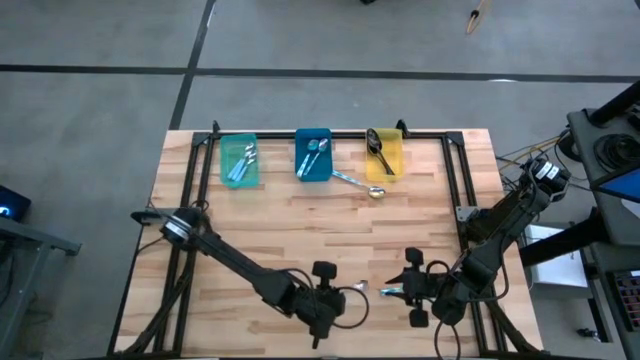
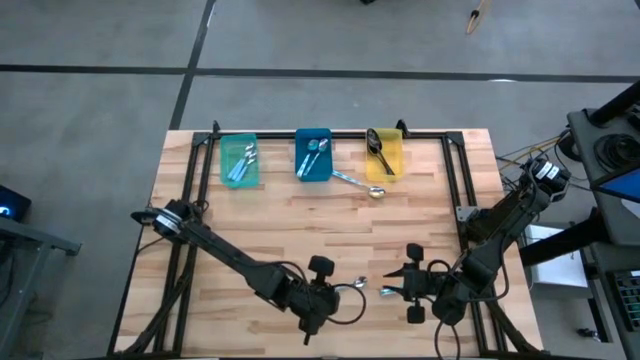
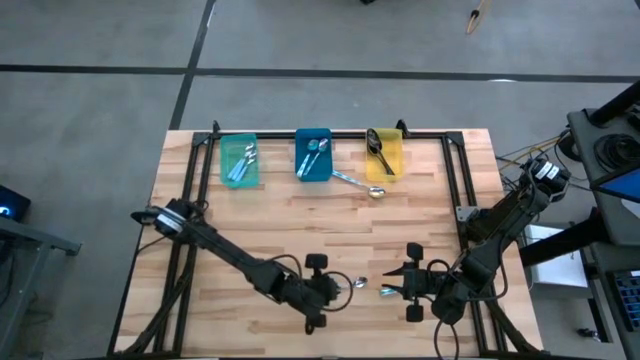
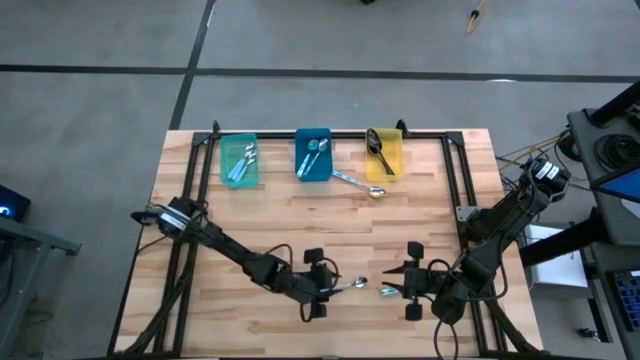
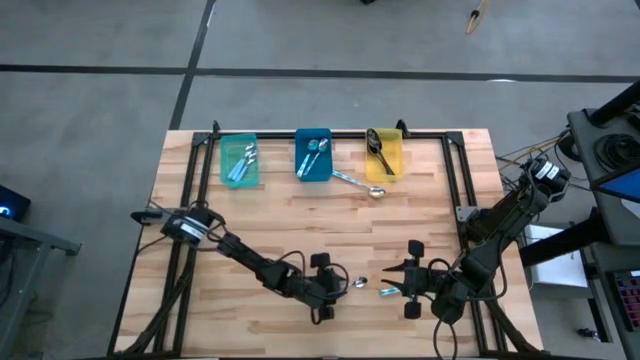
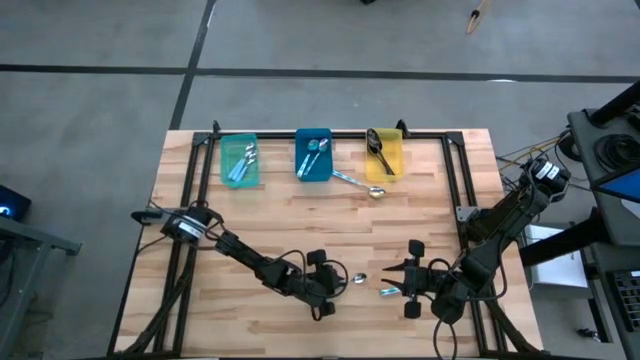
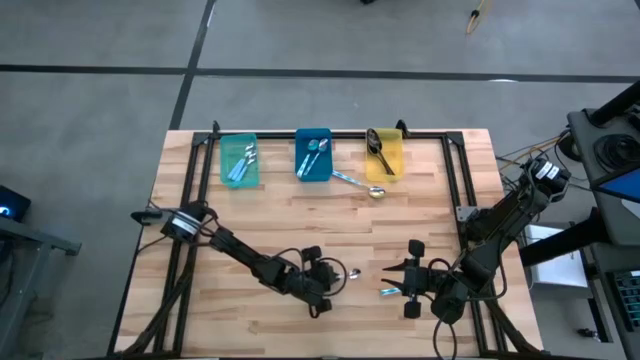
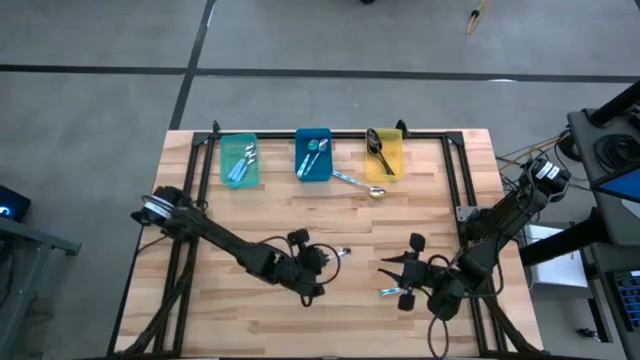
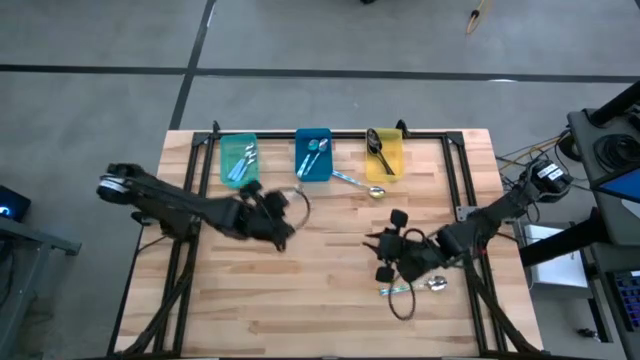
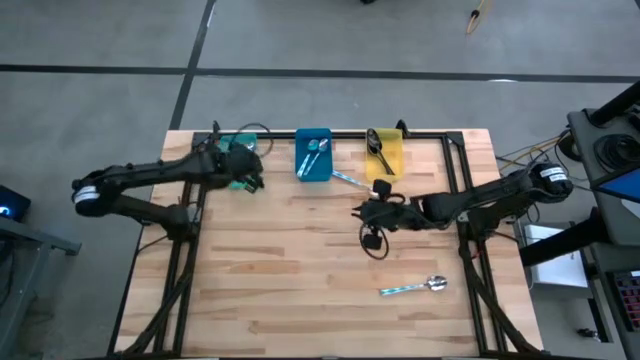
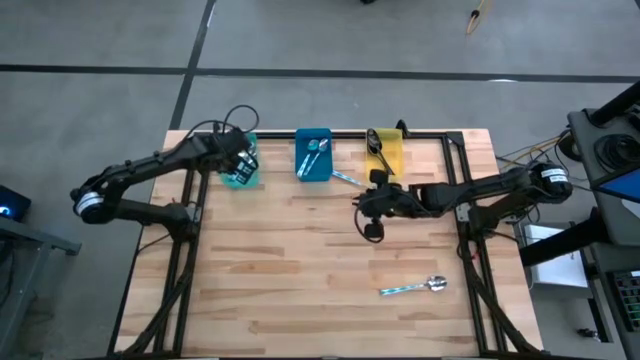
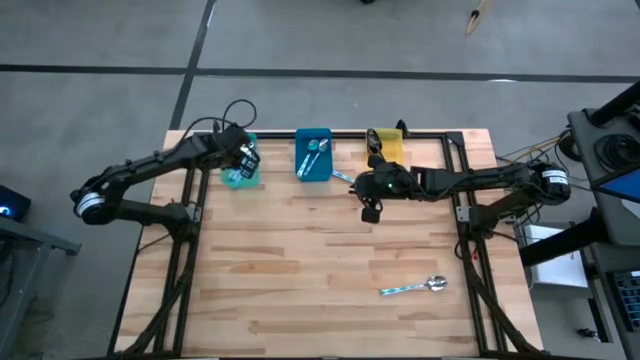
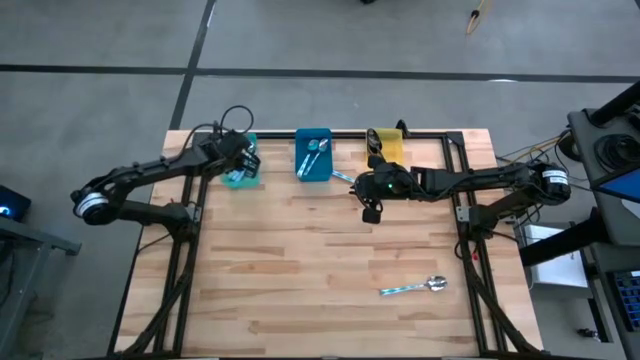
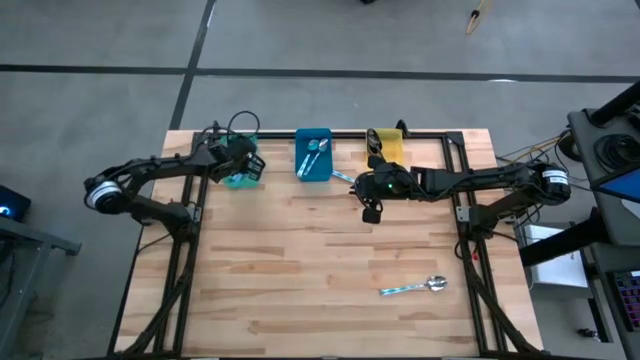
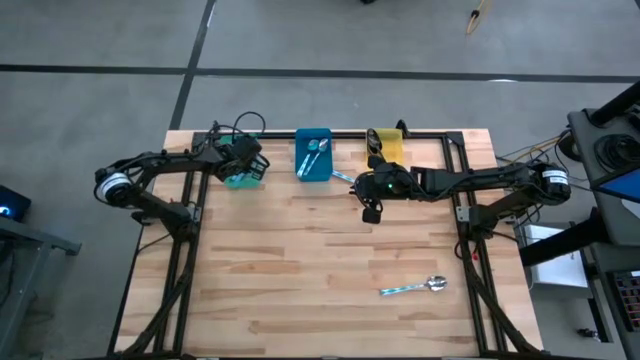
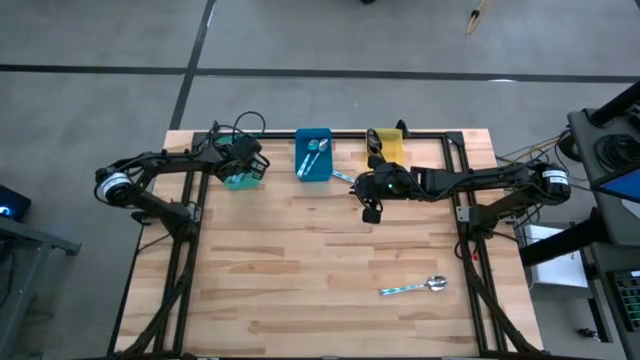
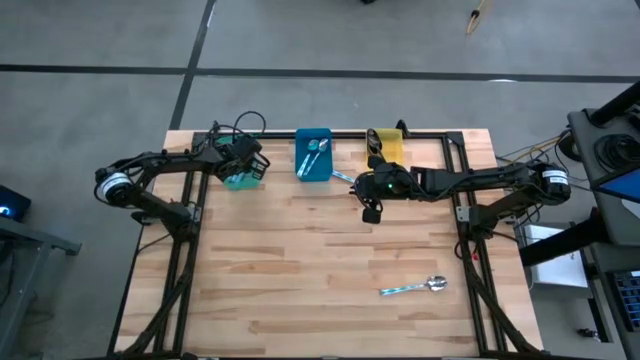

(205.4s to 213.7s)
Task: Sort silverware by color (type)
Put the blue spoon into the green bin

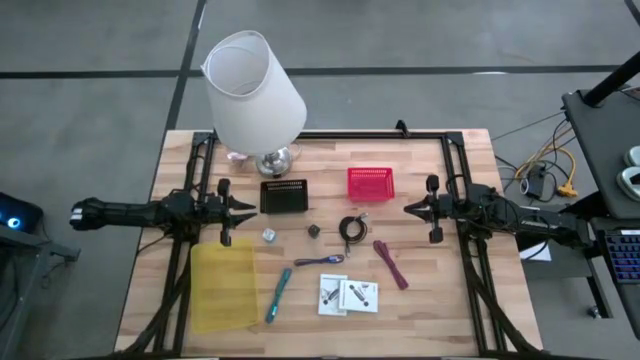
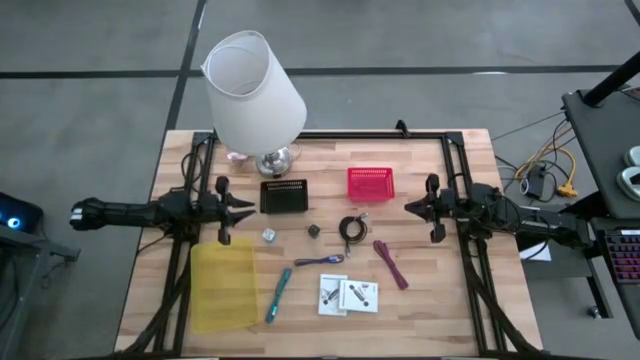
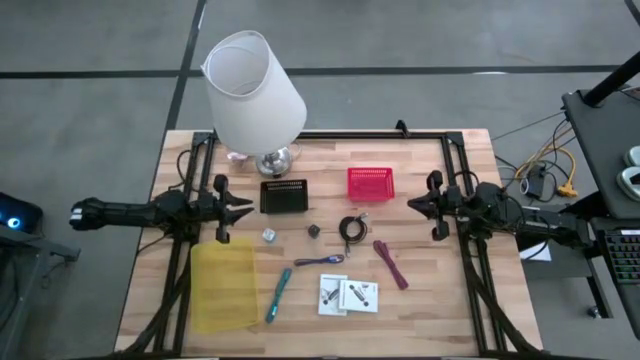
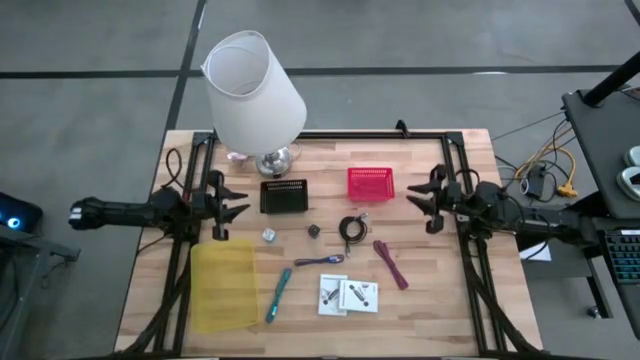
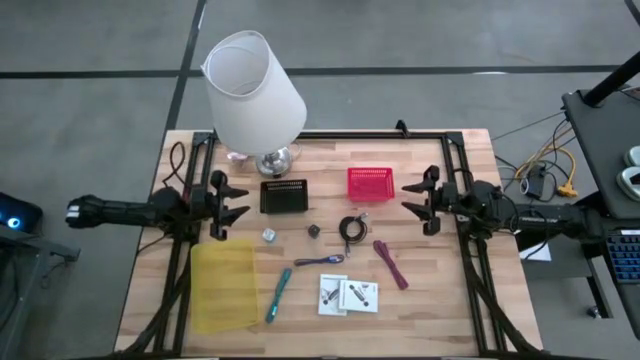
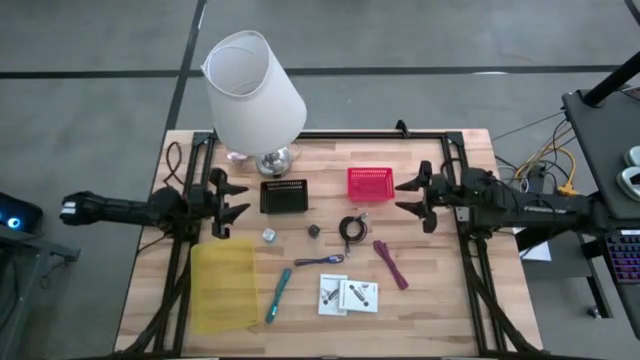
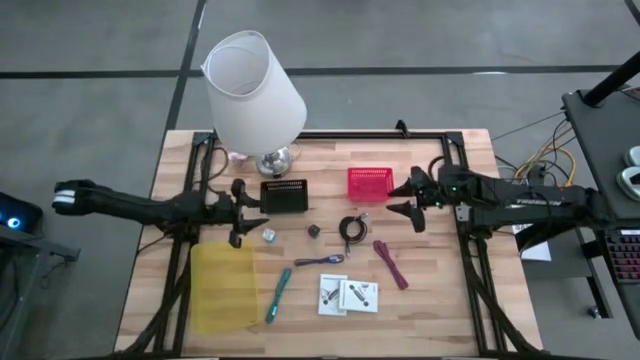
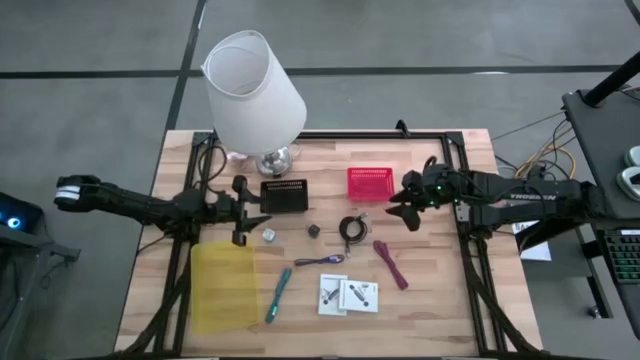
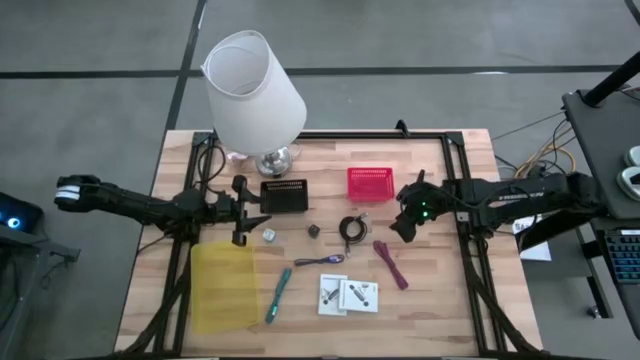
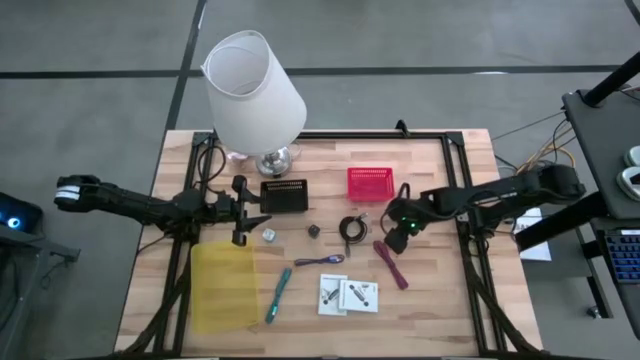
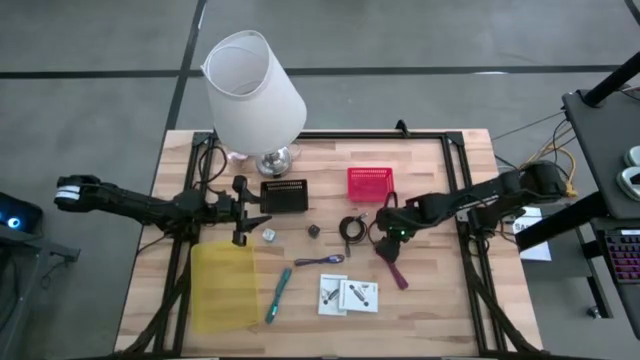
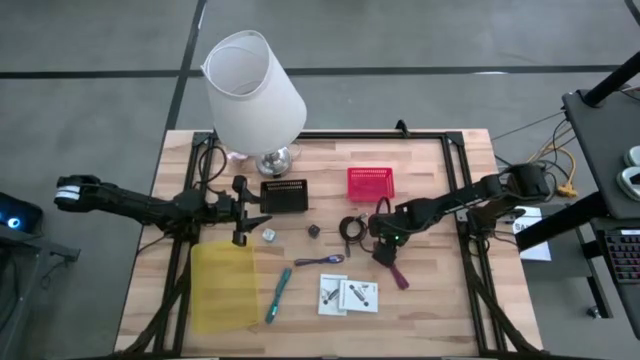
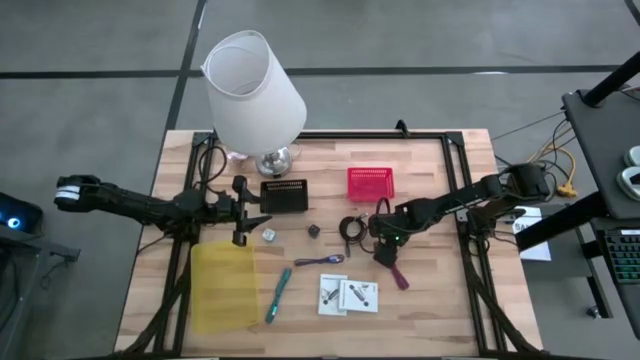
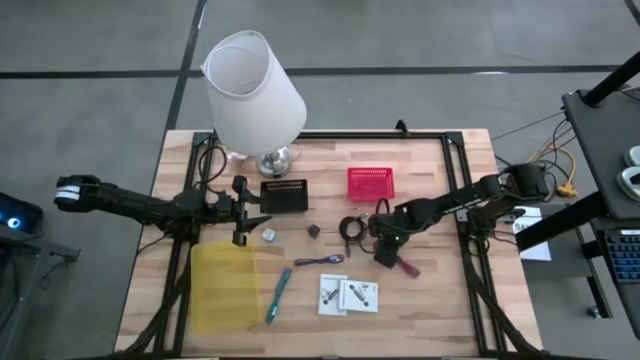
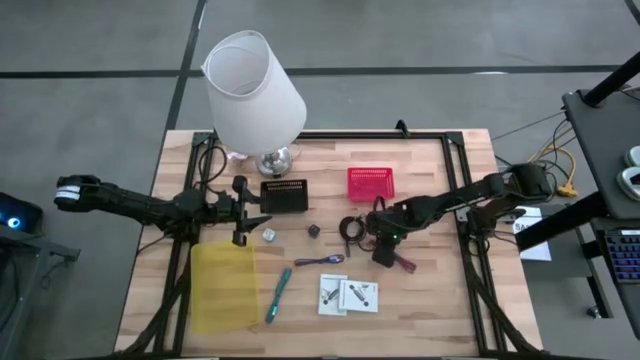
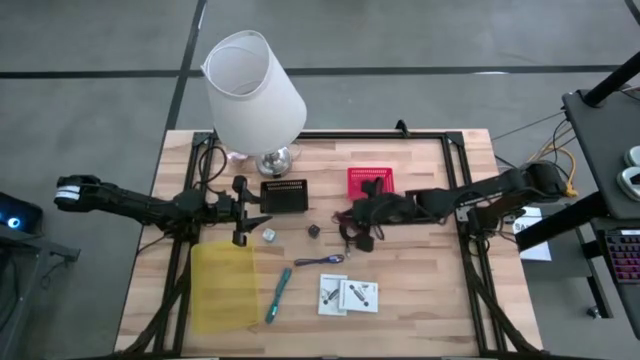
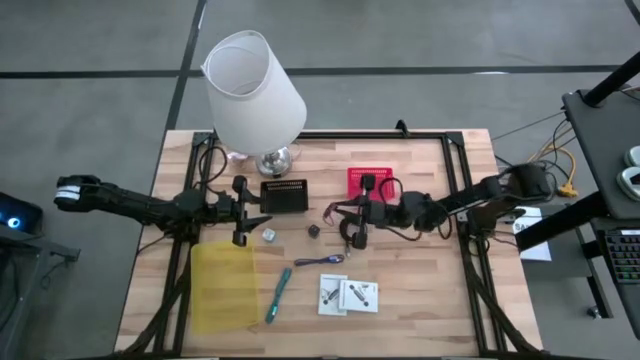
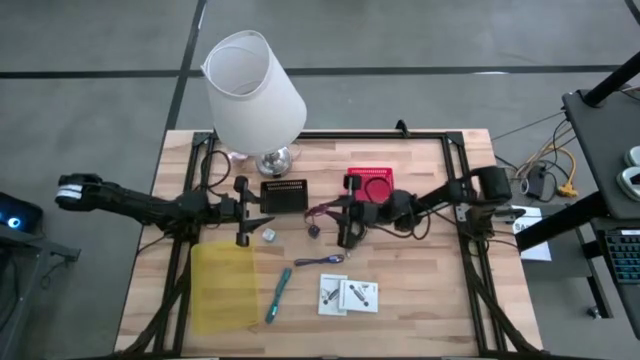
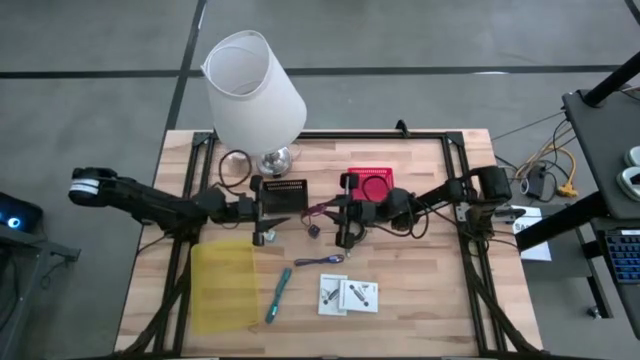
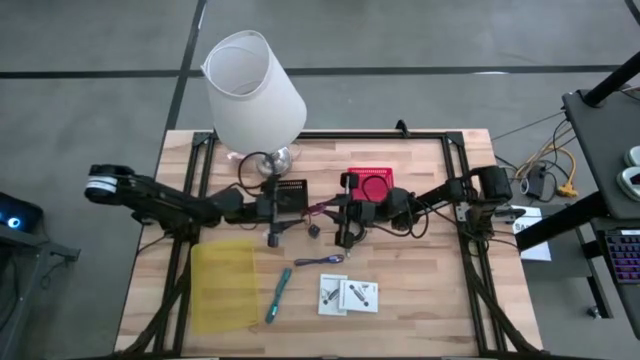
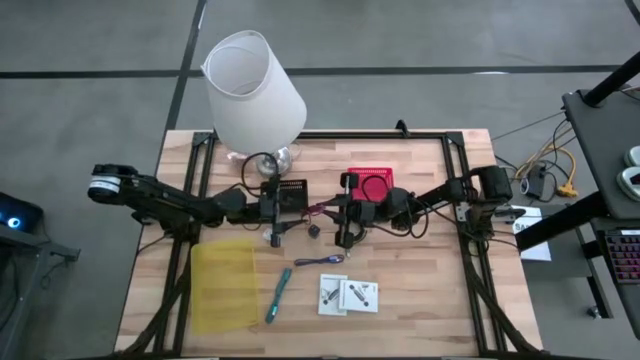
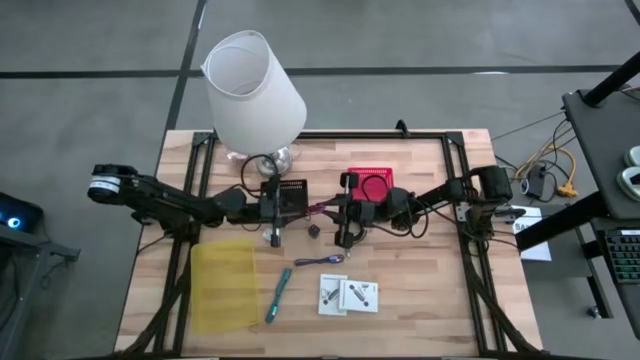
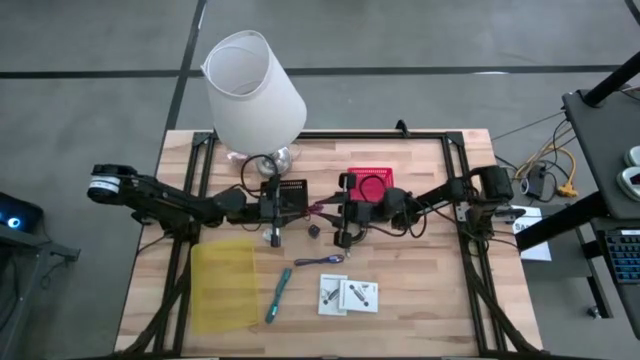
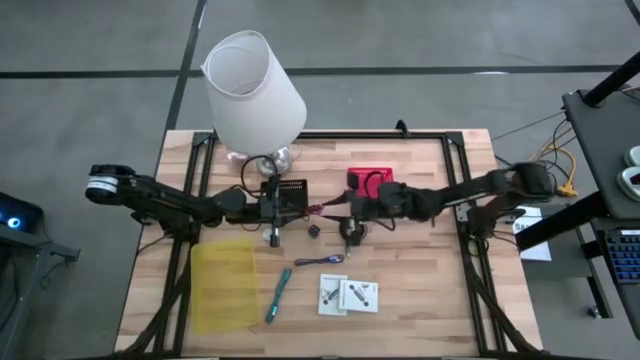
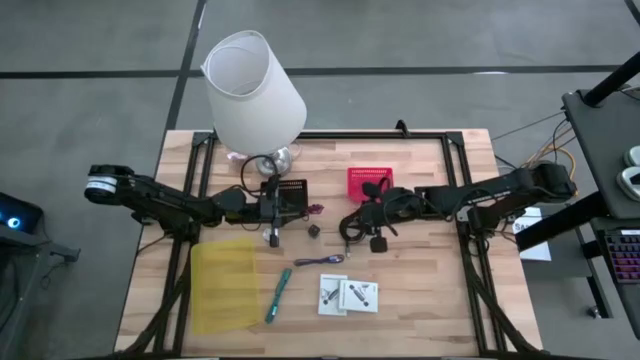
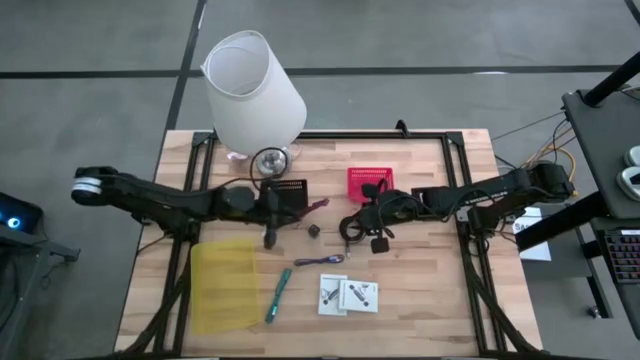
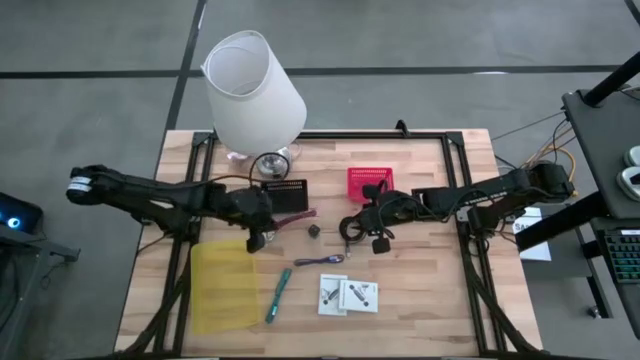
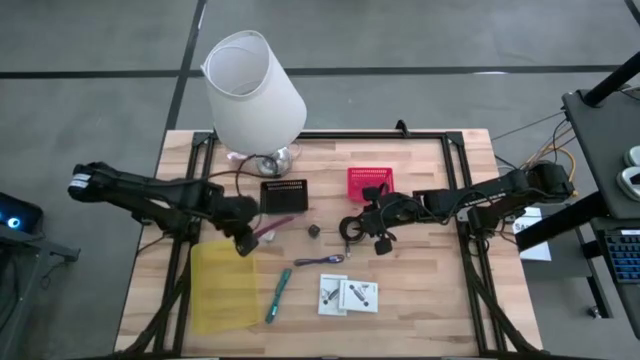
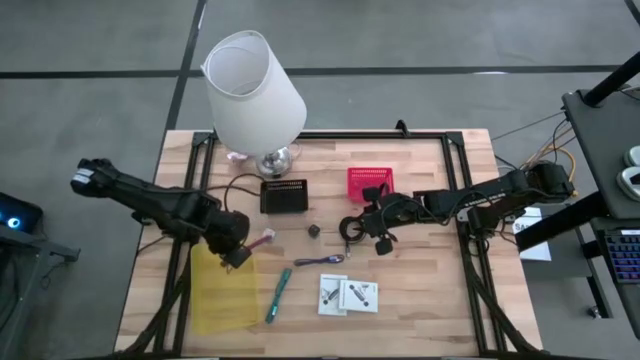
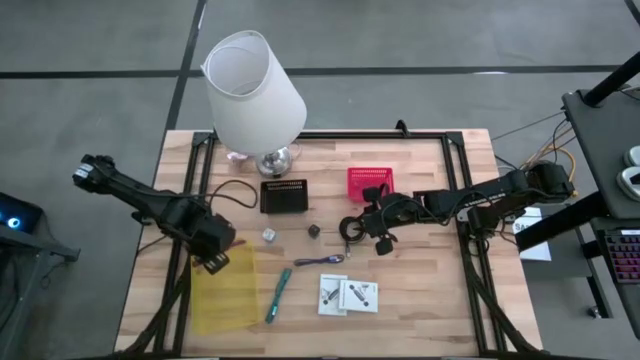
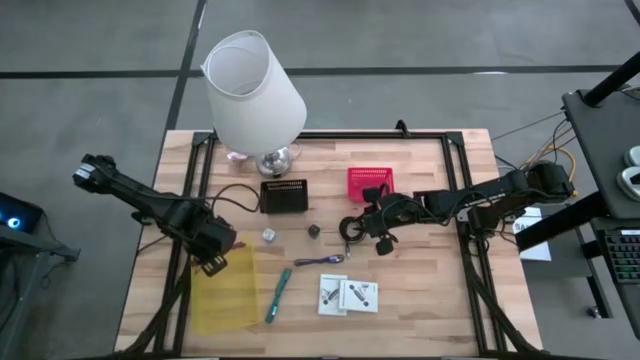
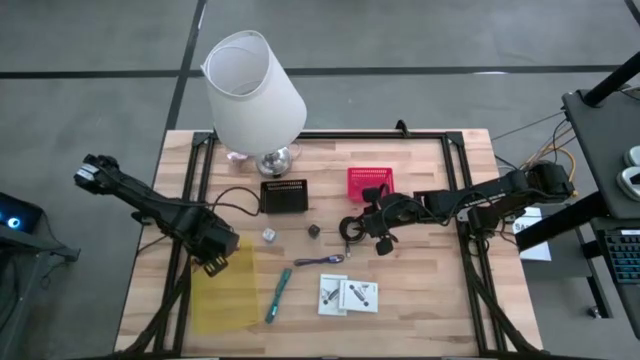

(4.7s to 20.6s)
Task: Pick and place items into bin
Put the pink charger cable into the yellow bin
